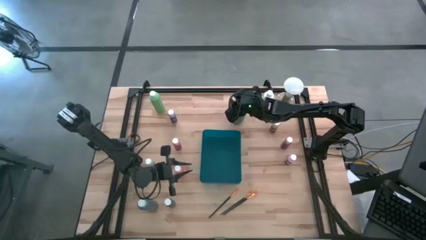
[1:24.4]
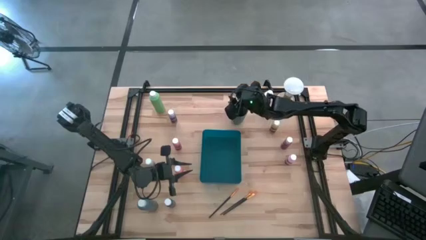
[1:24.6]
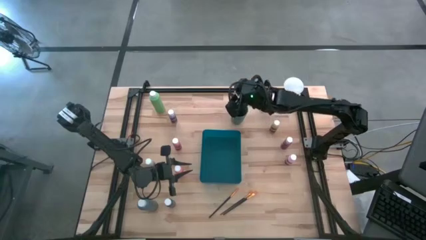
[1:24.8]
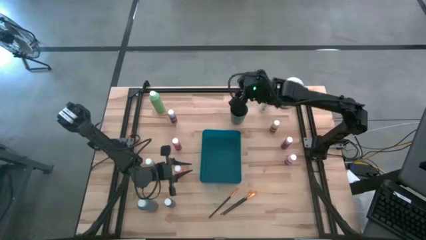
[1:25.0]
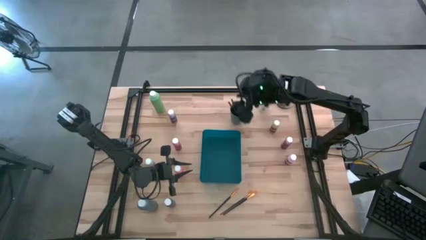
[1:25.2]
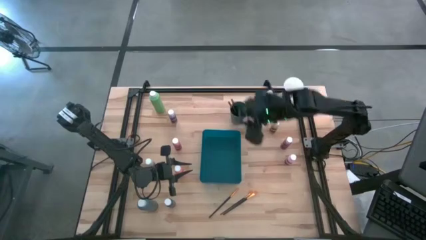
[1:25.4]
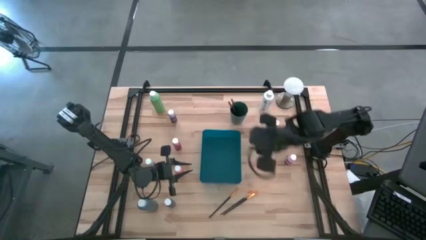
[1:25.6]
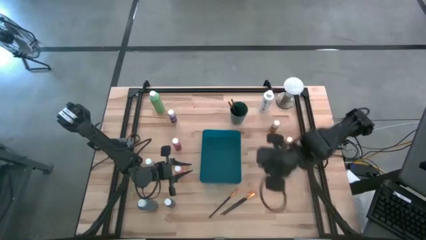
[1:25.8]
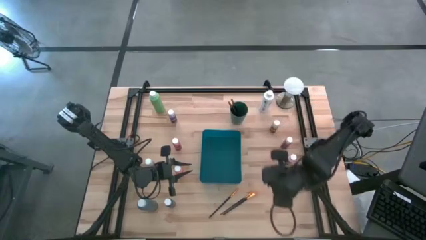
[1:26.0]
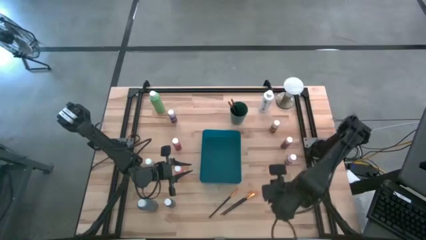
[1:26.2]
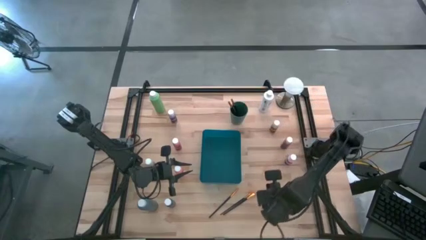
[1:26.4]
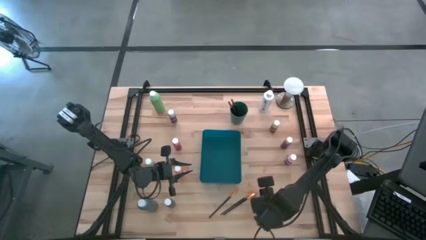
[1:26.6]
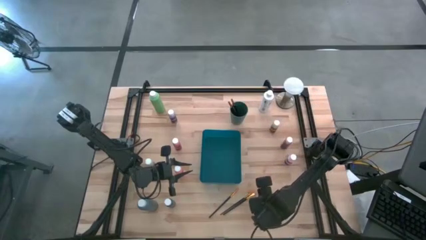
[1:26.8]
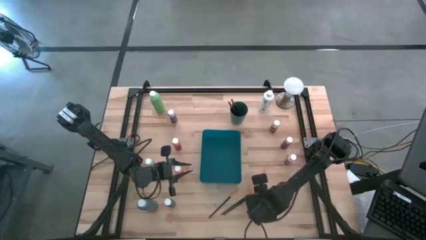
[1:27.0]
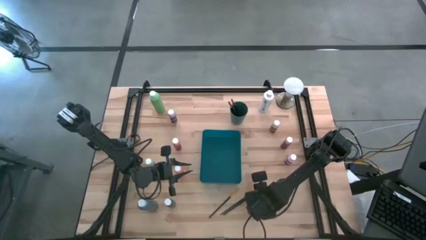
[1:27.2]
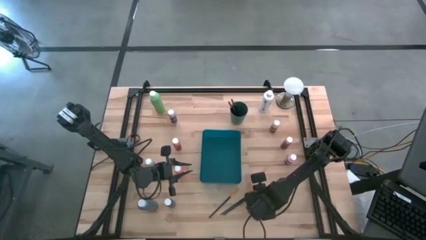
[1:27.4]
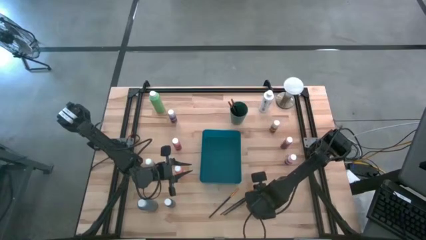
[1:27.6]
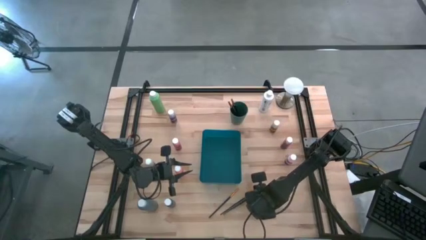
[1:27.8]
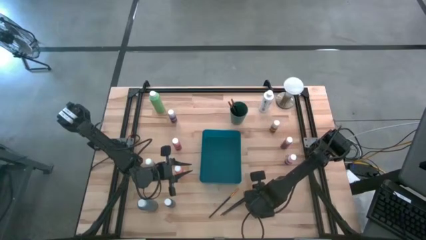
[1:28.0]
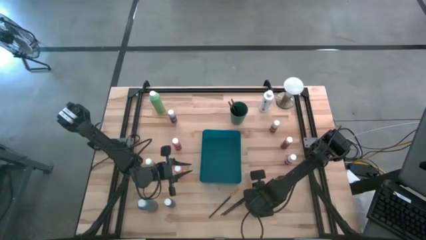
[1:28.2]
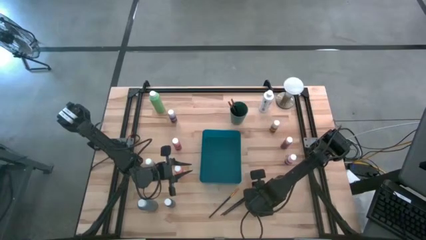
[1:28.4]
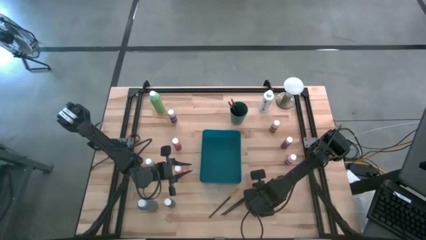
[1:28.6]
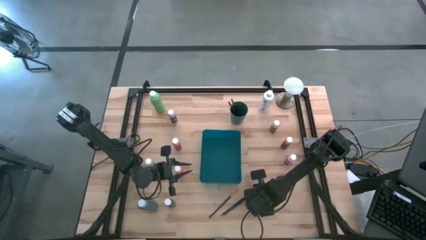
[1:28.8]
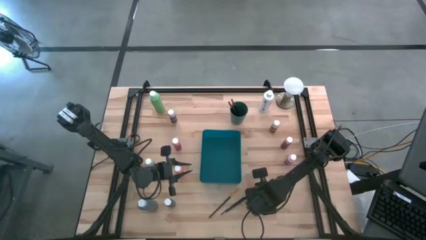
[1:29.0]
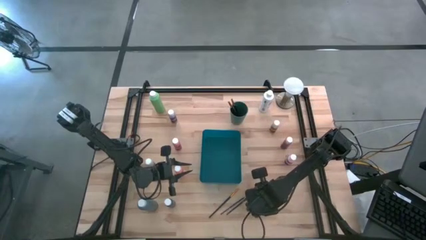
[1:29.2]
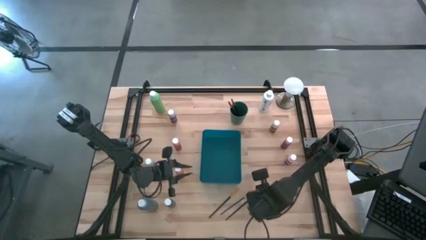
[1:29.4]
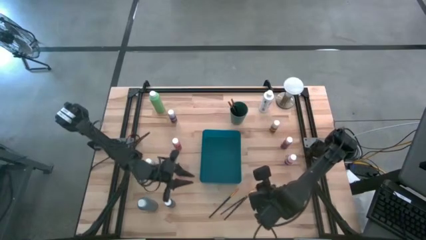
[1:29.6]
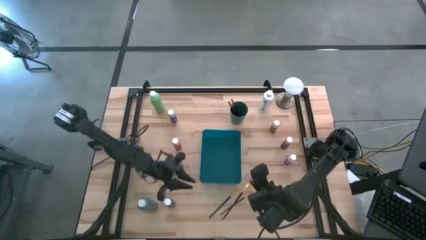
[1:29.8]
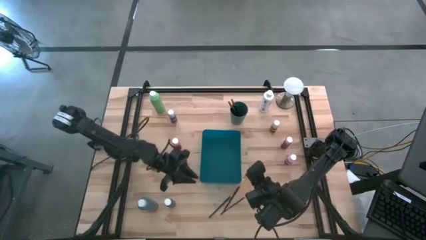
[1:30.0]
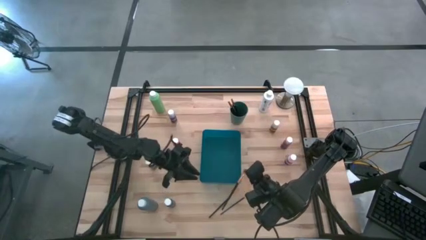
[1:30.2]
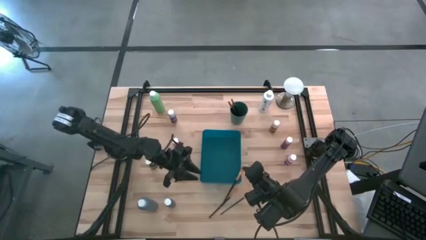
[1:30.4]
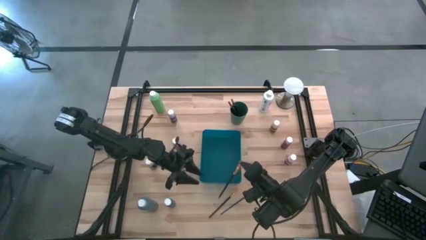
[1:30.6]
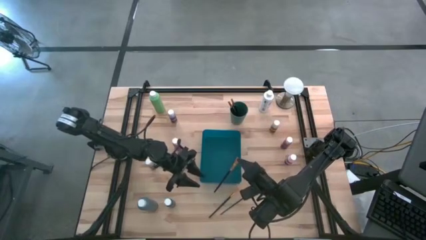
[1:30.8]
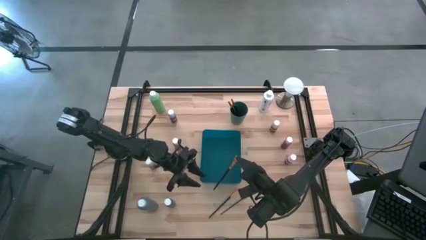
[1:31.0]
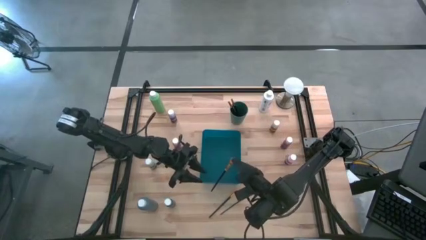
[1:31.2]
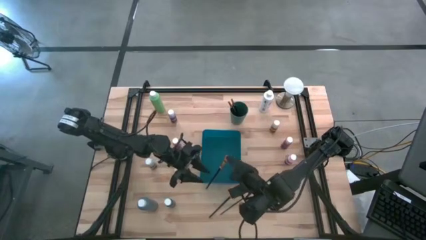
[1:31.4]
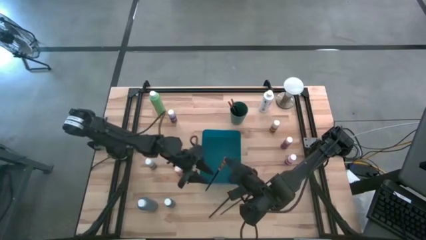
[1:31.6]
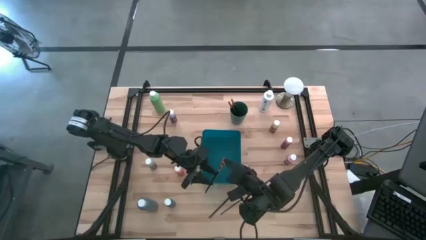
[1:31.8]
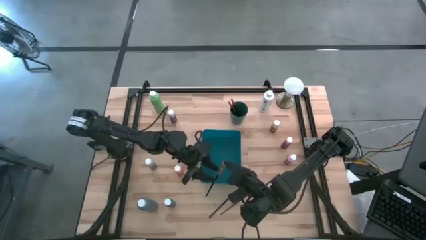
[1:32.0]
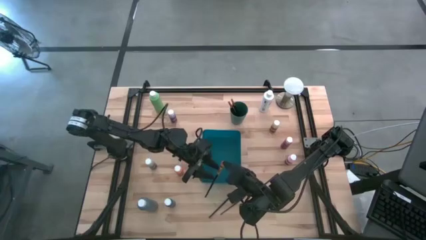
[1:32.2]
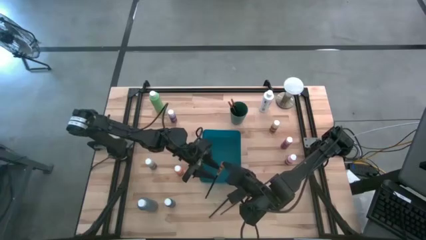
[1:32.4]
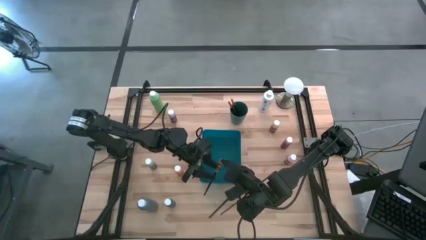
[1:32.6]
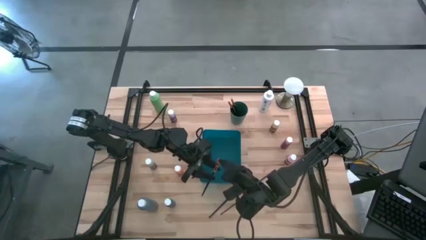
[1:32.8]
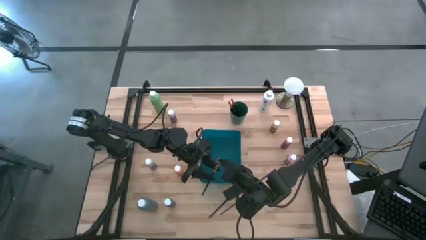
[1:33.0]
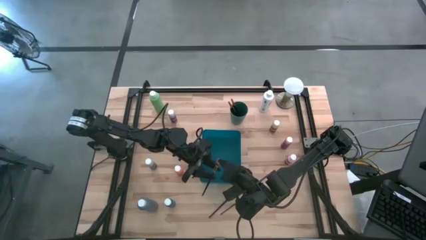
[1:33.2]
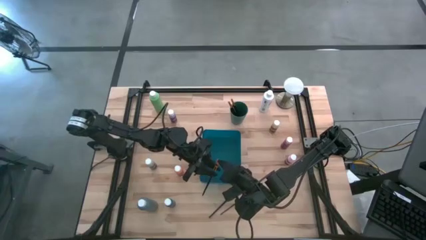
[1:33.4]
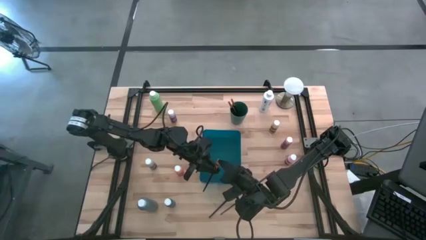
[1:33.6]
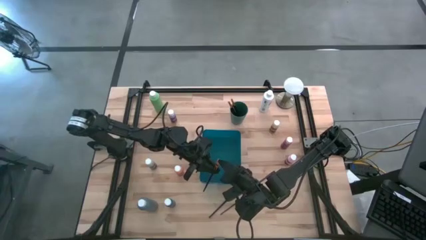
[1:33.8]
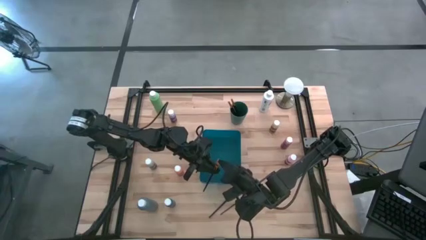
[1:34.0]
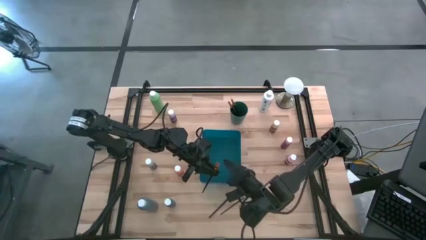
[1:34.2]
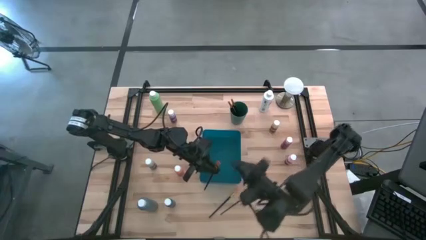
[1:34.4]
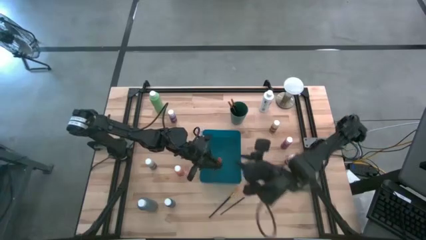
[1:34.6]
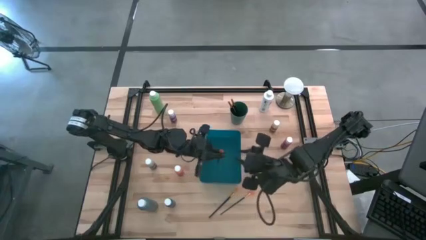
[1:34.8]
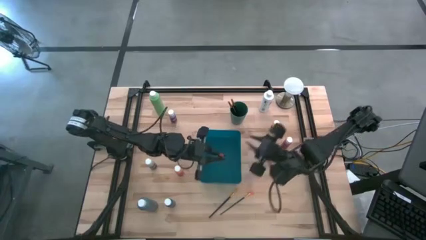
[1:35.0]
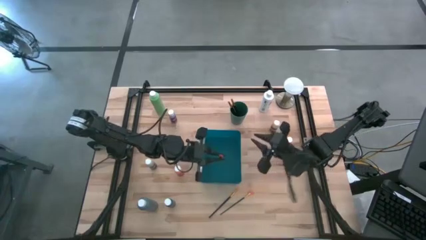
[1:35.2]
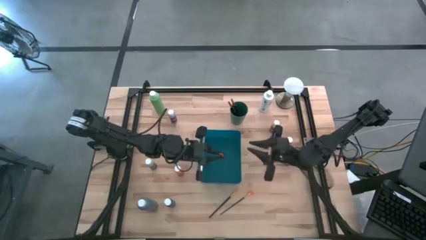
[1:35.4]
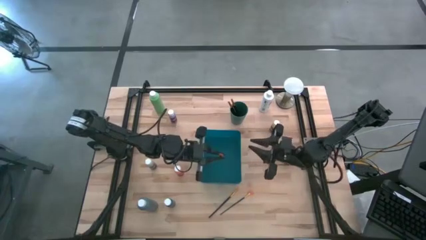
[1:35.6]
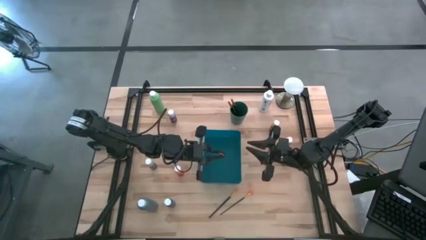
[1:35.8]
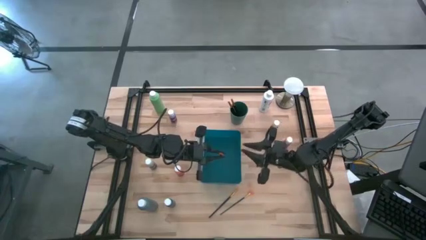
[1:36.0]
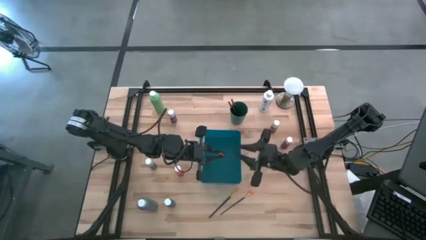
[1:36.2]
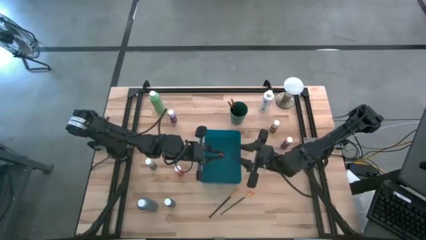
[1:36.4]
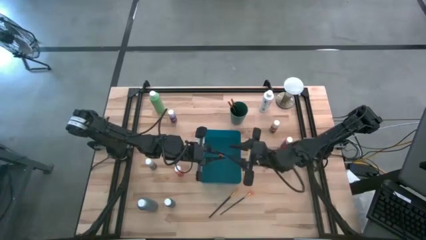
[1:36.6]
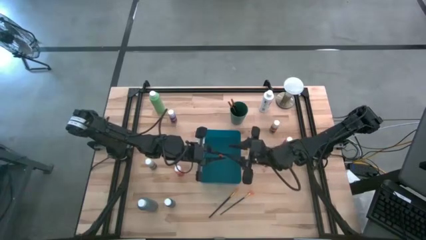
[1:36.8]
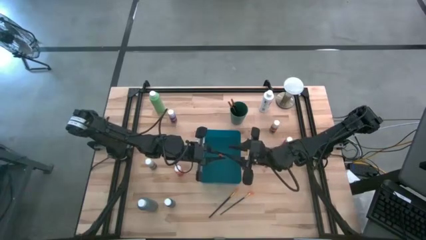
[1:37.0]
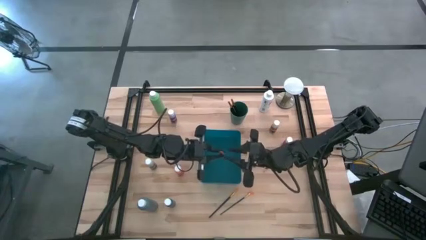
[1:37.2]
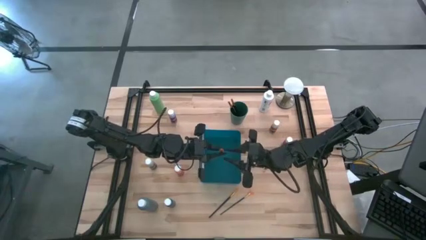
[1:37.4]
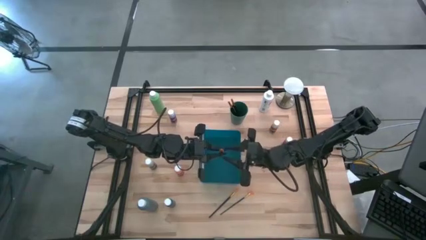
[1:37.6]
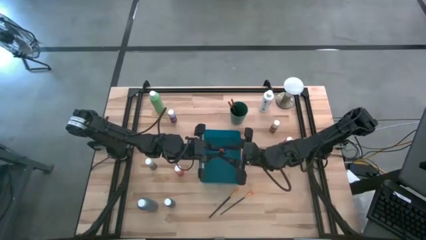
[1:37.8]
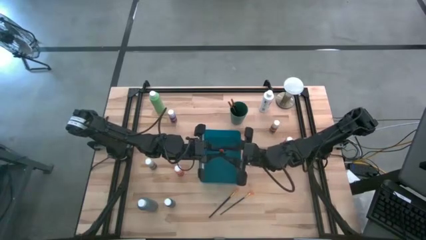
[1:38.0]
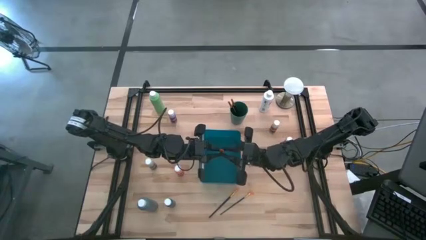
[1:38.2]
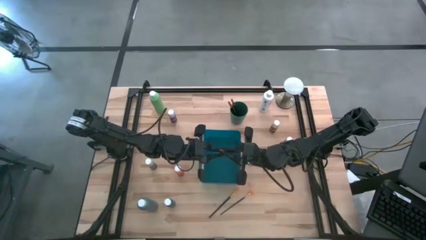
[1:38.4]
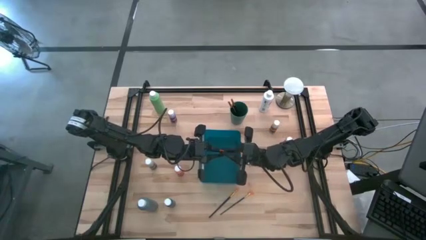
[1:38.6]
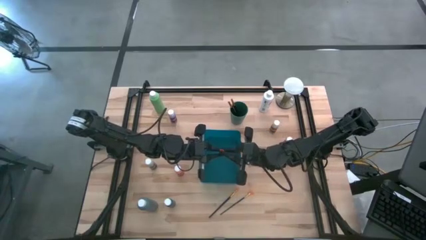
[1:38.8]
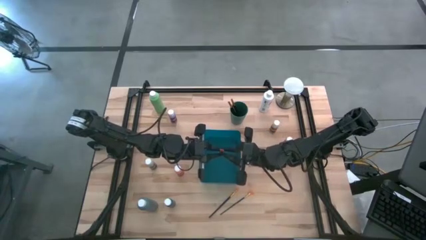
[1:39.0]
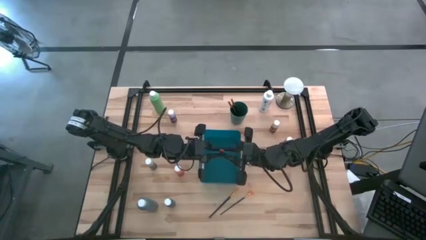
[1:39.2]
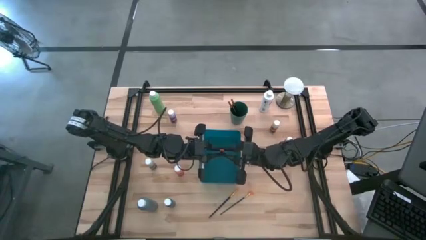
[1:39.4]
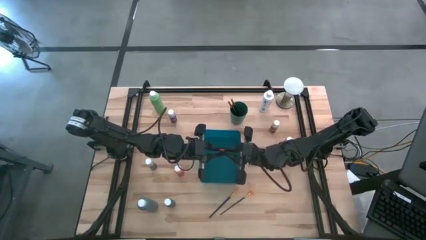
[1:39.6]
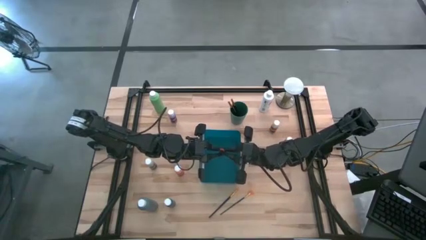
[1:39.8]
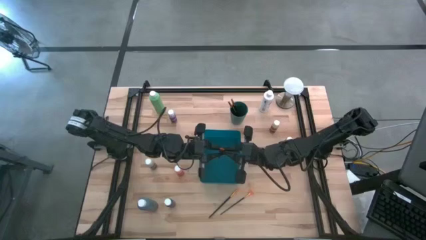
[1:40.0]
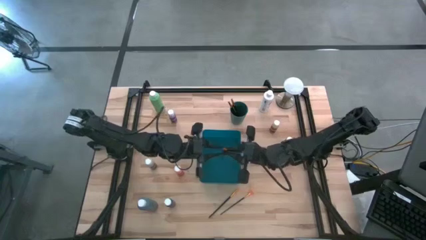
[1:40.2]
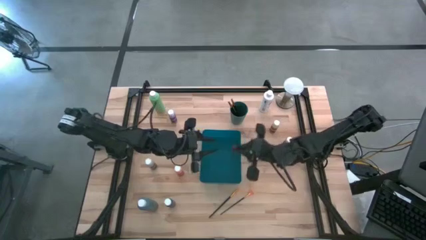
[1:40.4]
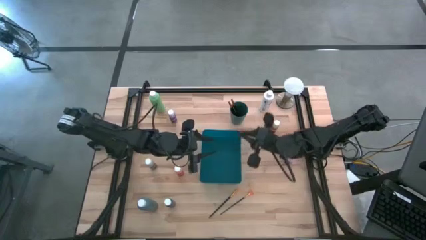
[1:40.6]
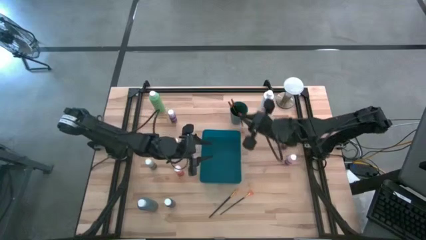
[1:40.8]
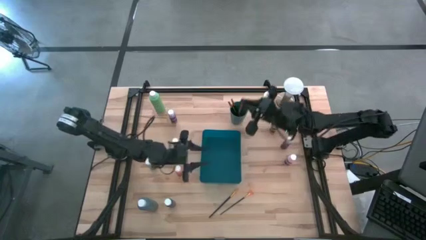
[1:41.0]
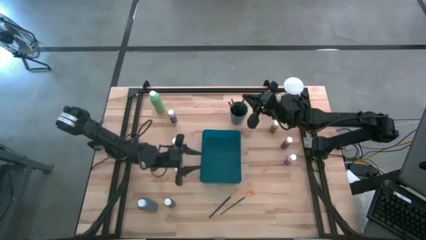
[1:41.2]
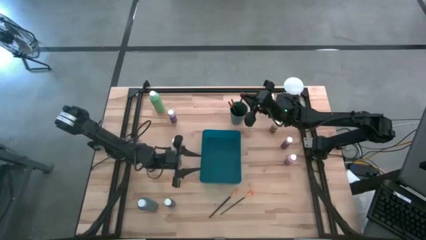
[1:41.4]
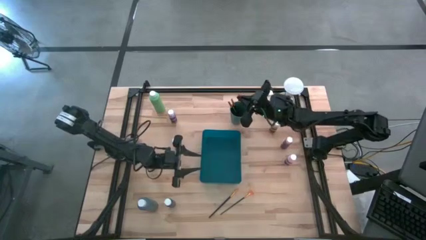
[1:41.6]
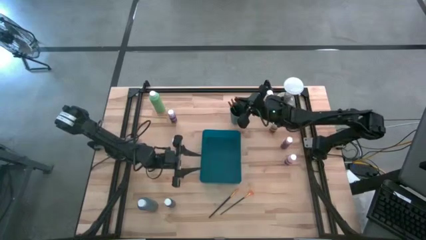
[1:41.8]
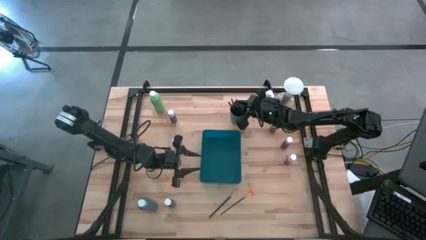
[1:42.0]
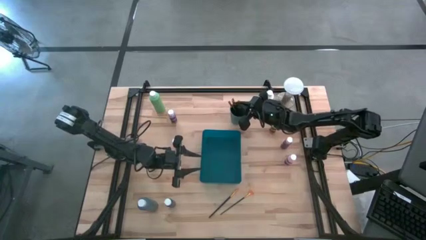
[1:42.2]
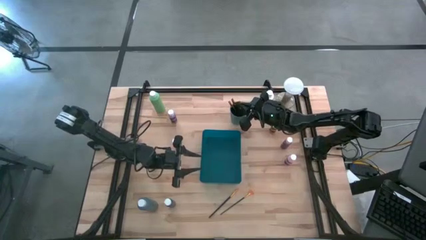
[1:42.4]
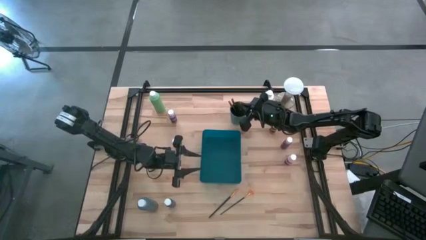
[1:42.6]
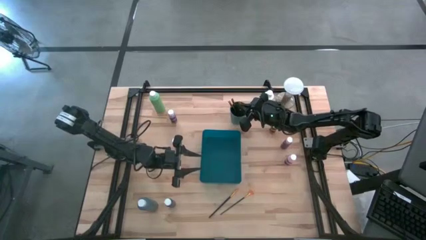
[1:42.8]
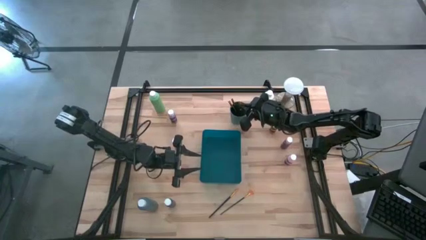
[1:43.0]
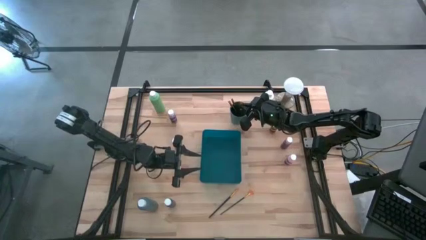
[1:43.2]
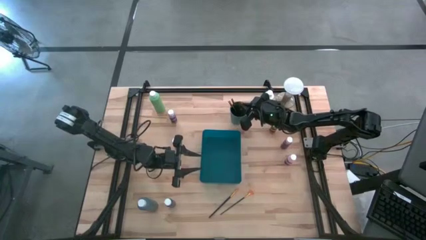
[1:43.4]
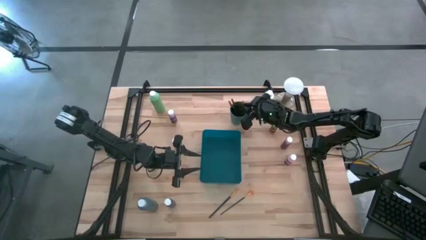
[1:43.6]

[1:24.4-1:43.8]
Task: Pick & Place Paint Supplies
Put the gold paint brush into the green cup
